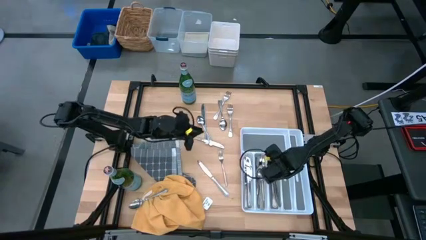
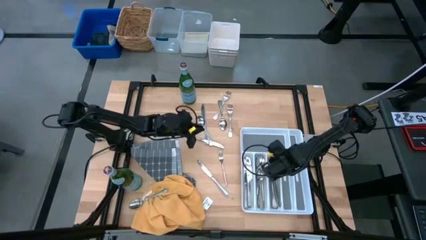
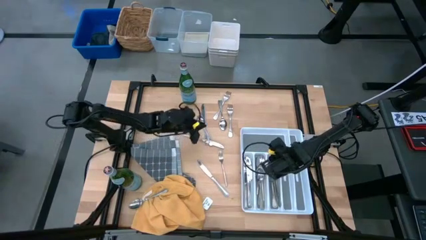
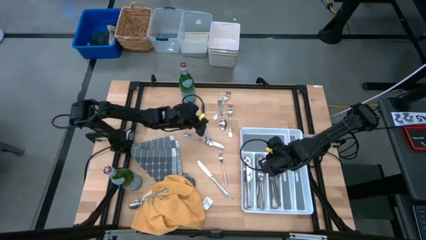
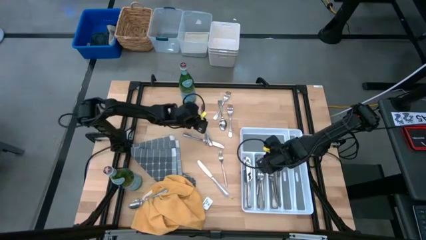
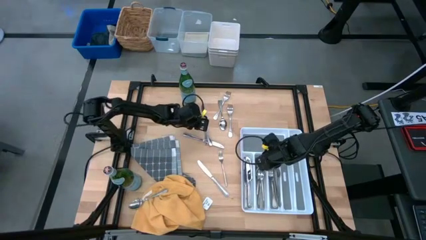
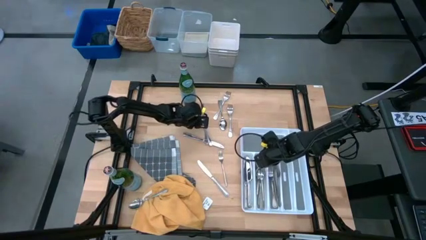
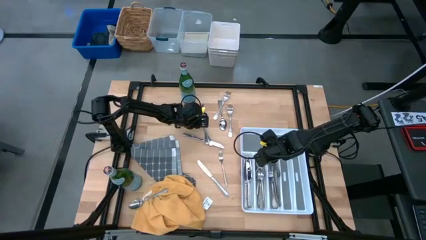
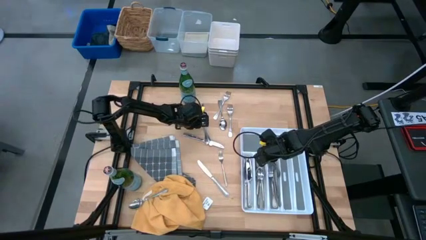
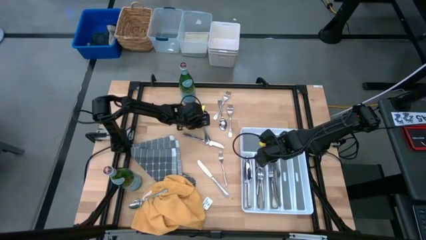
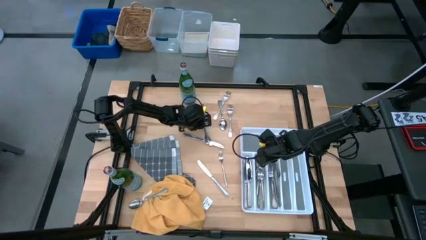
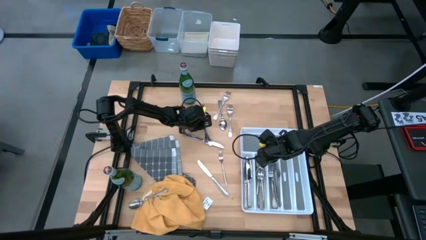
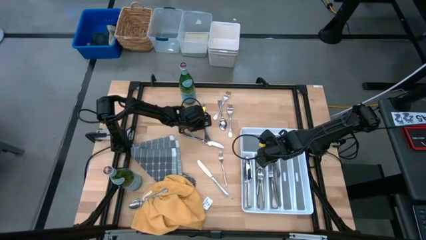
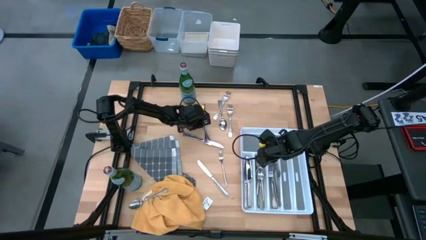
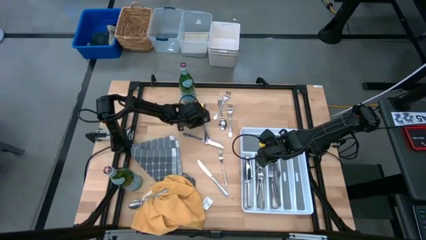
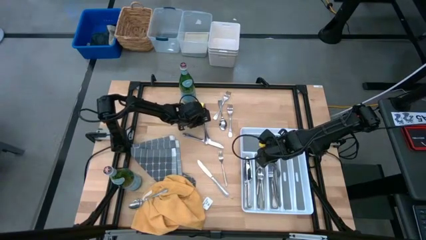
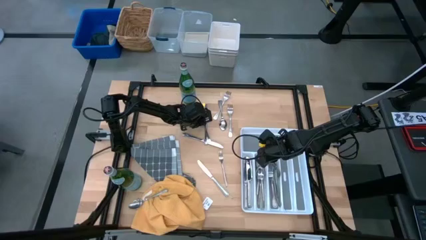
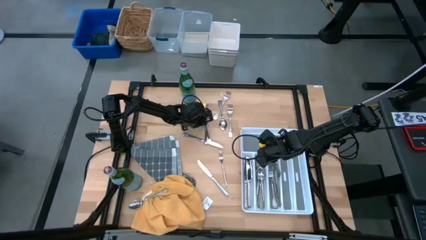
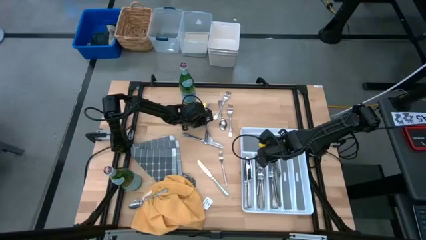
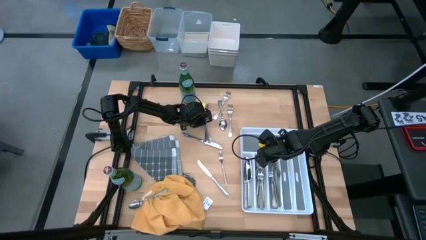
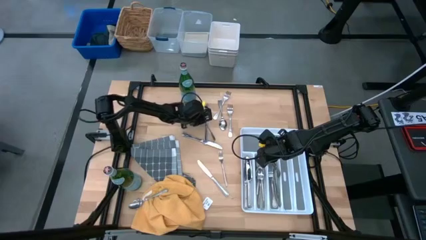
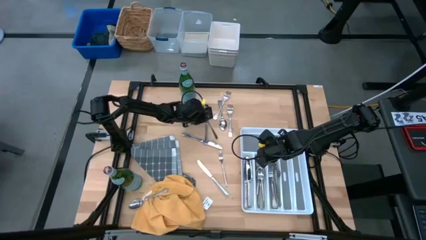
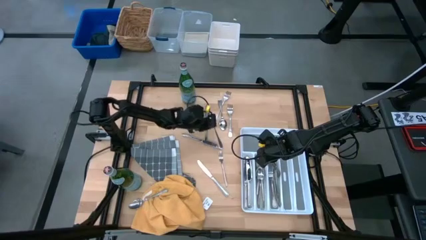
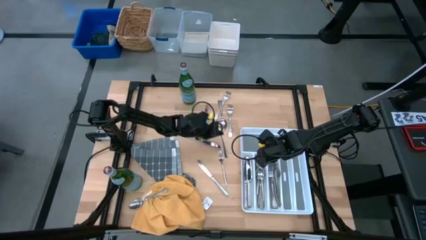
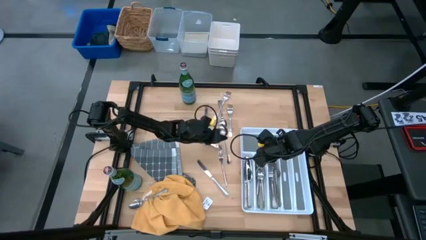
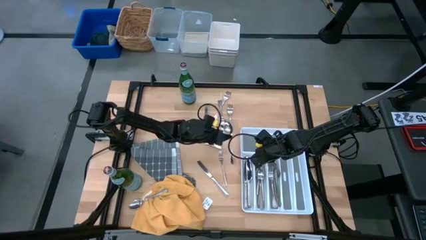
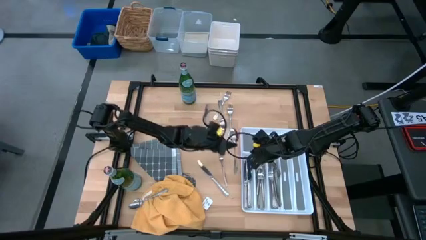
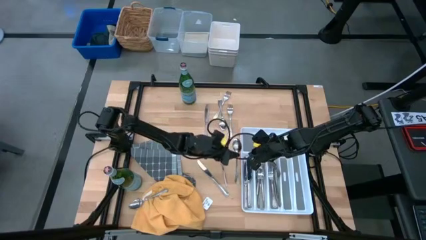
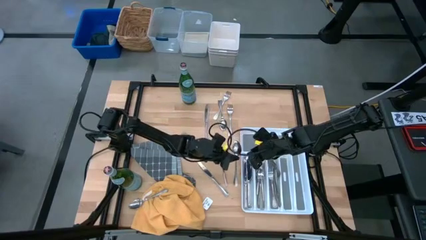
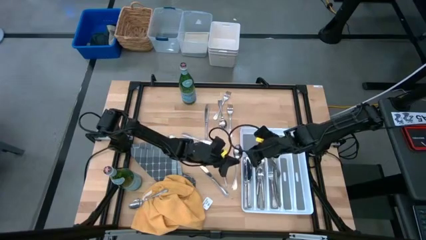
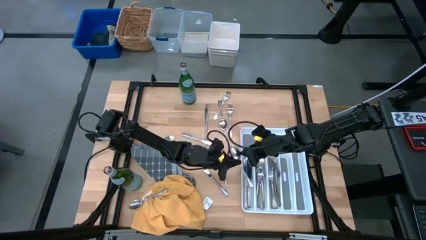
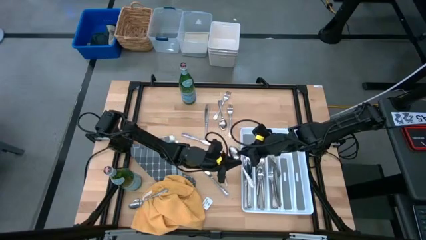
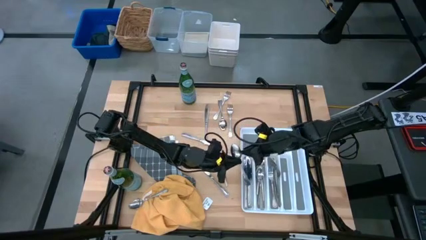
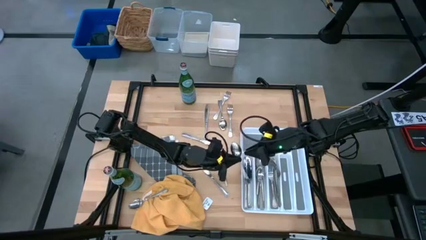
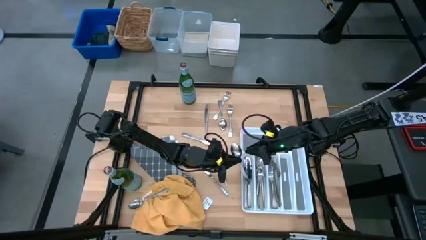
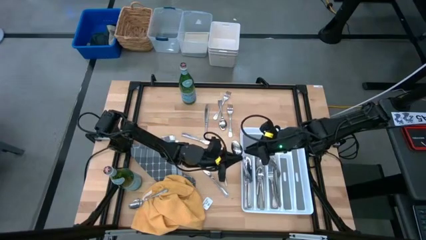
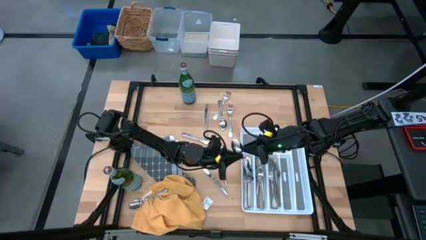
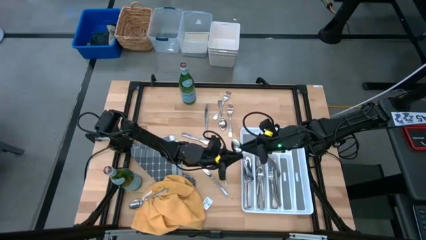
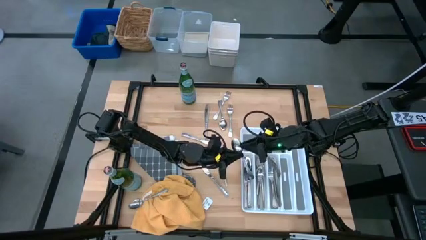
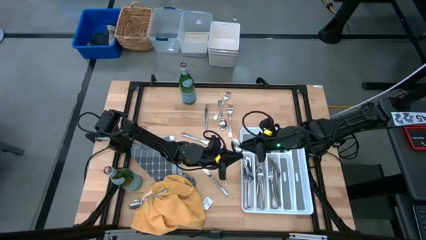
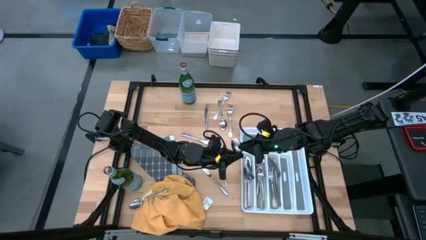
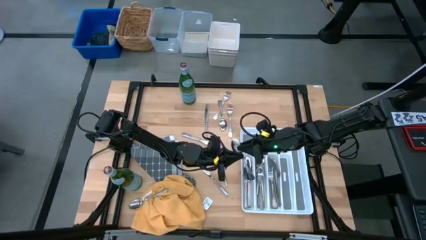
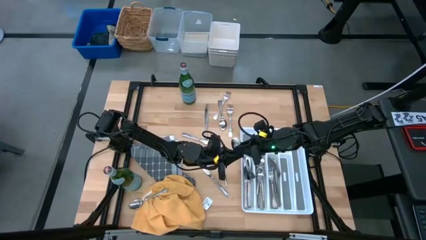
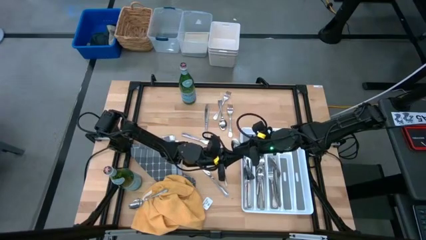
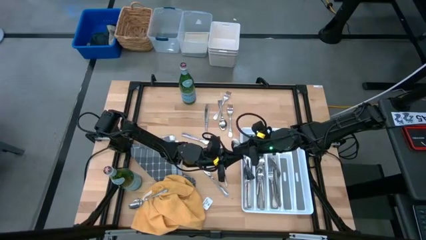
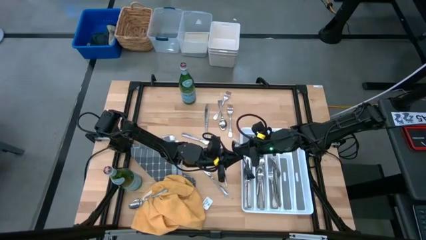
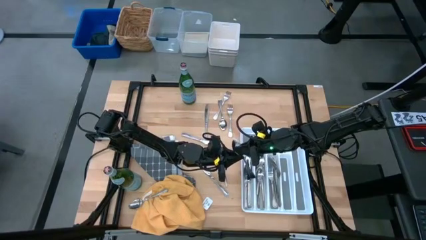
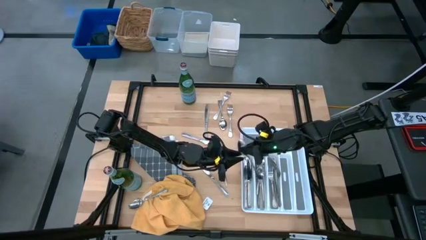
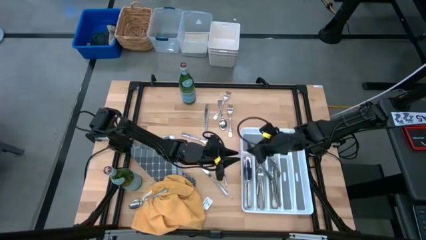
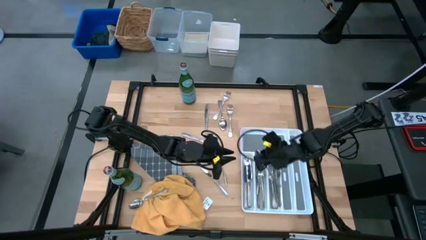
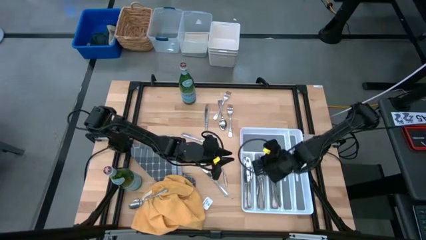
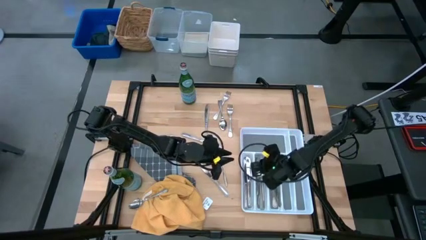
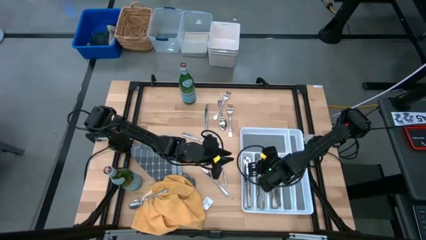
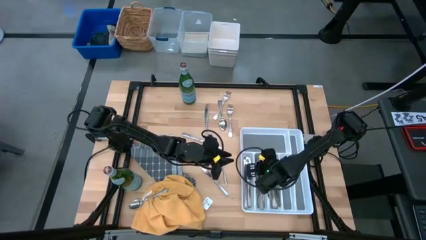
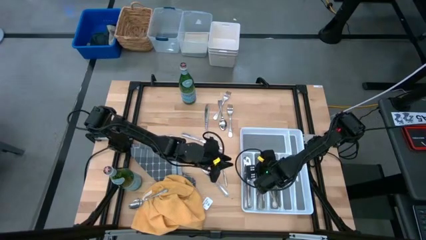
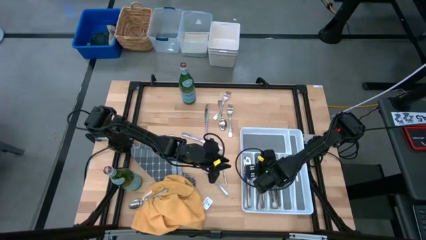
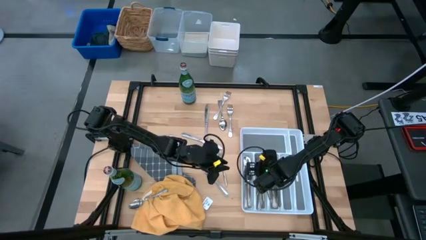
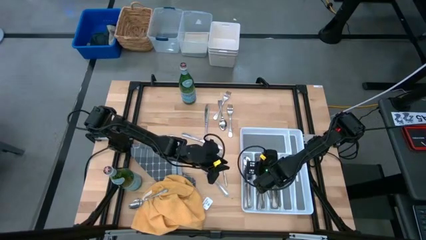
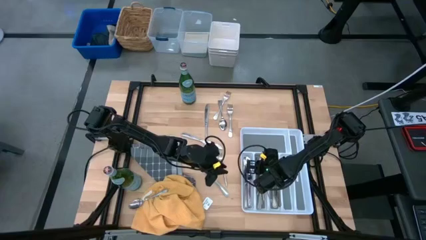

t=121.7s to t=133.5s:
Stack the silver spoon into the white utensil tray with the other silver spoons

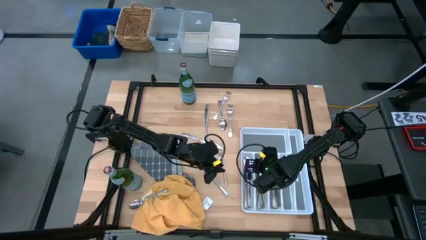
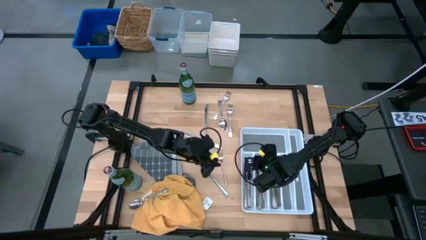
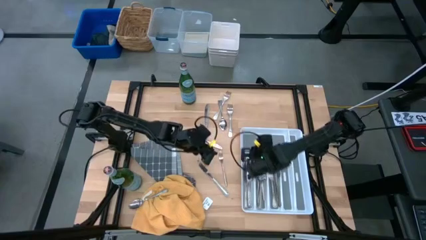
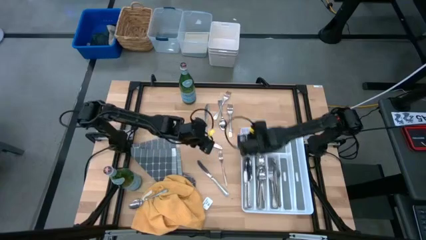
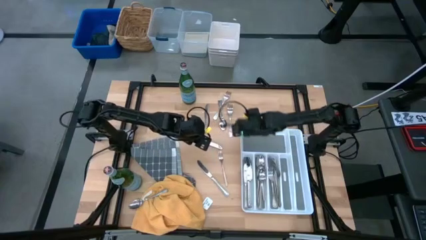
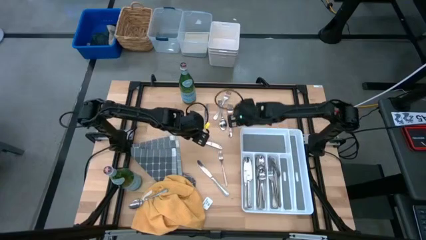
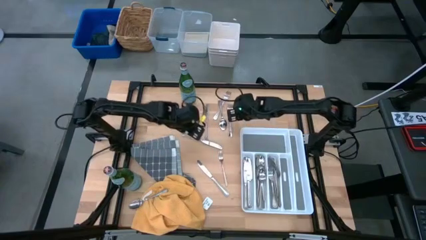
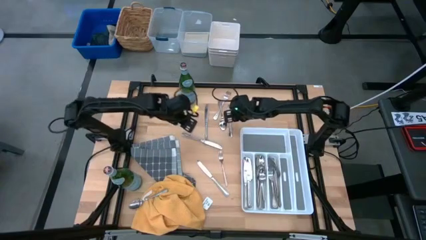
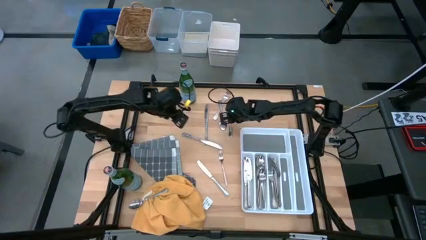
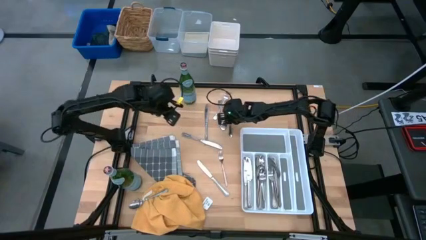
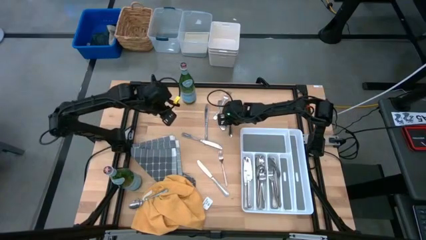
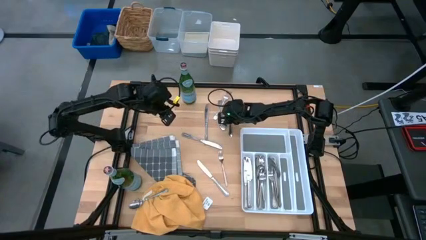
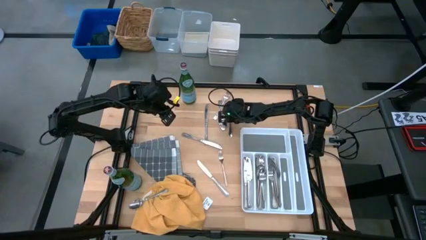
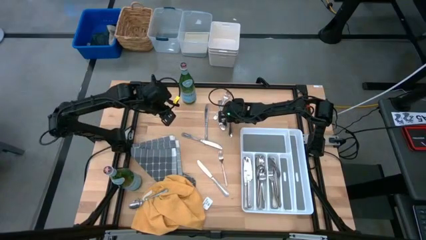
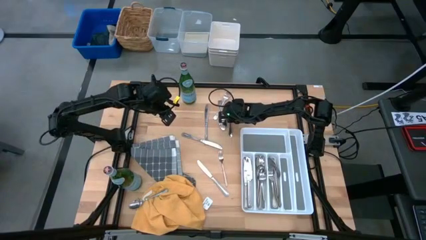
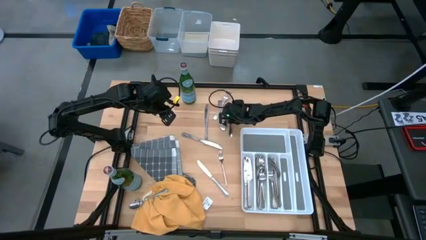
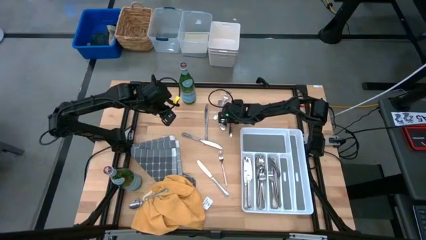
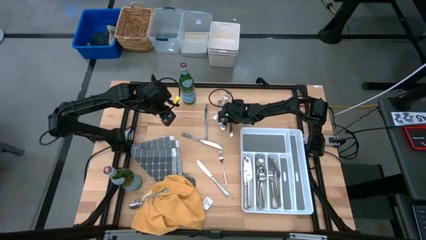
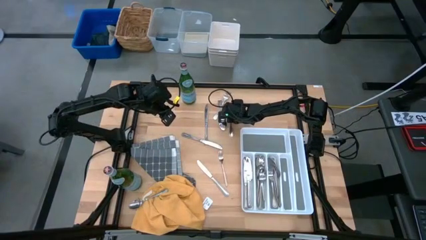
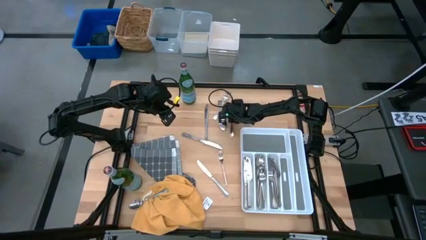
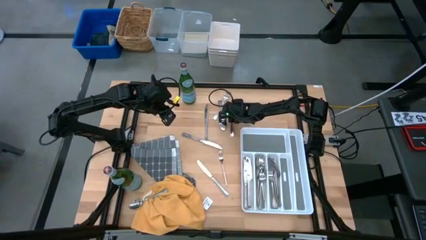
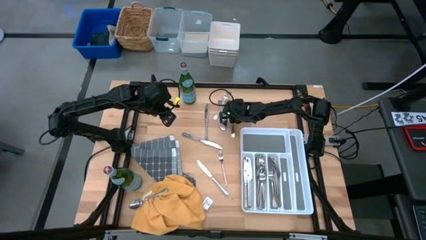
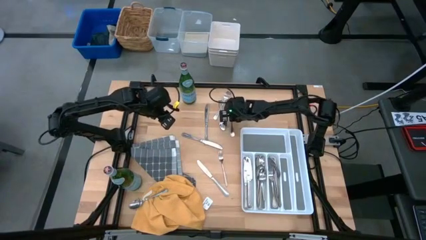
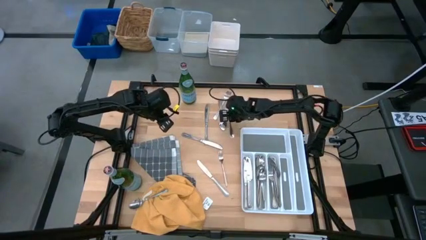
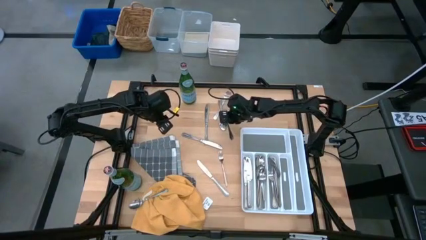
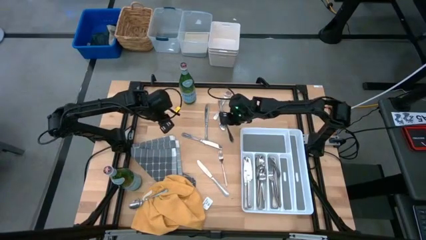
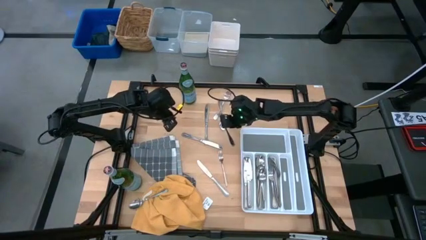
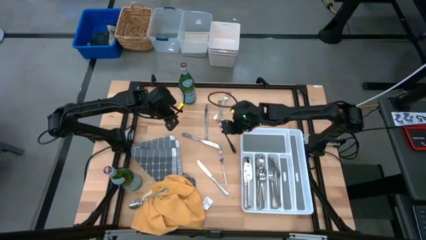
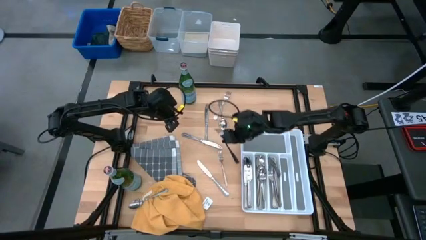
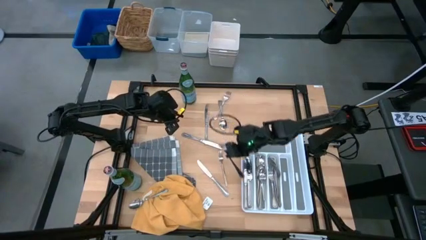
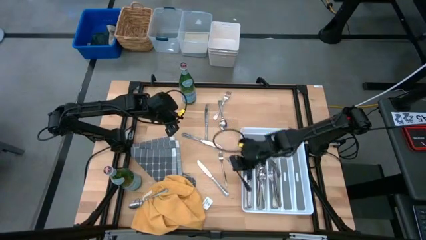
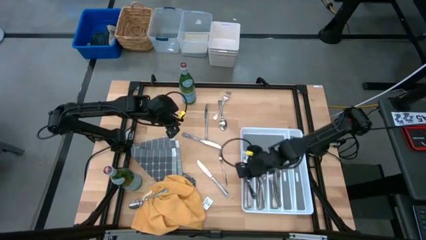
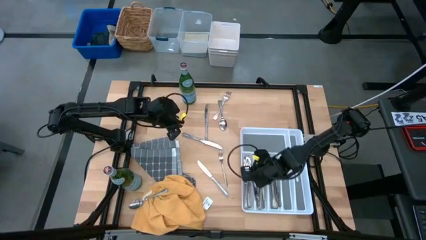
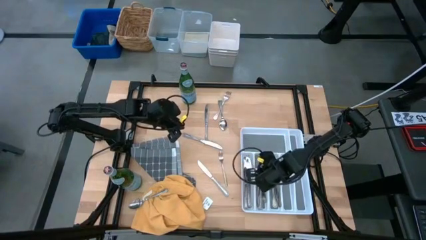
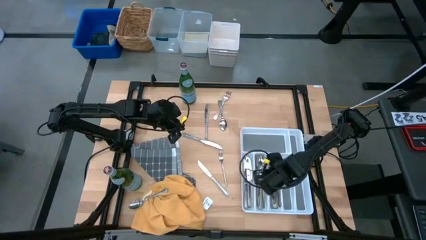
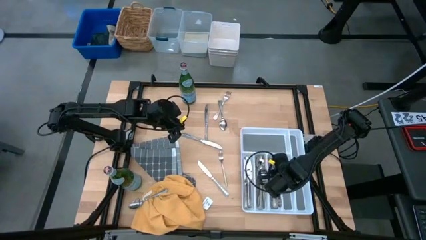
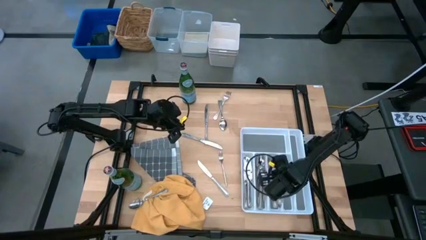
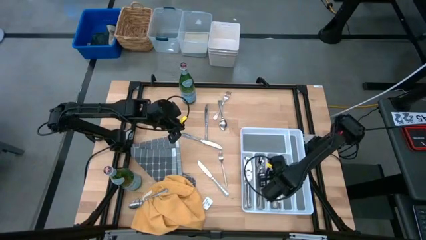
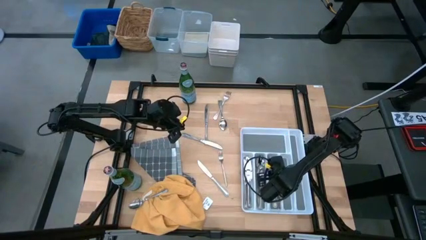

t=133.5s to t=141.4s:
Stack the silver fork into the white utensil tray with the other silver forks
